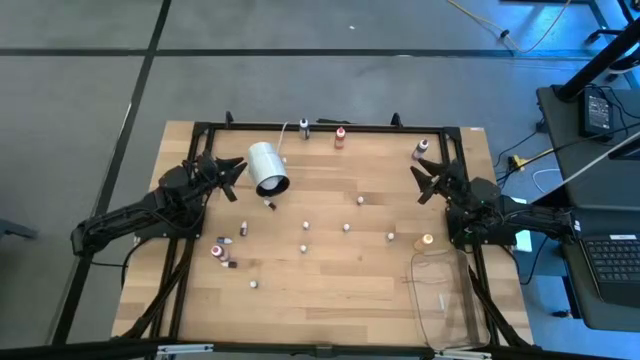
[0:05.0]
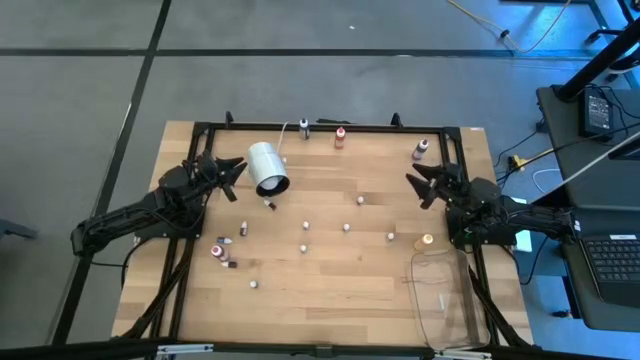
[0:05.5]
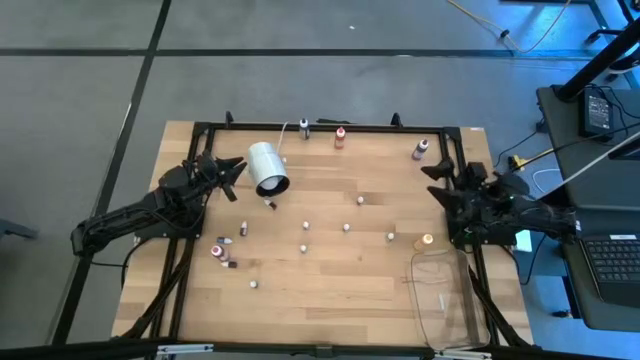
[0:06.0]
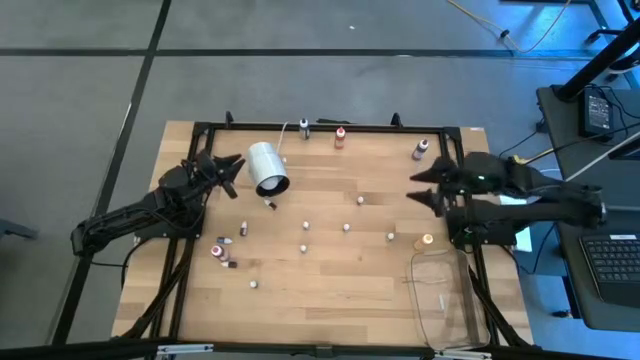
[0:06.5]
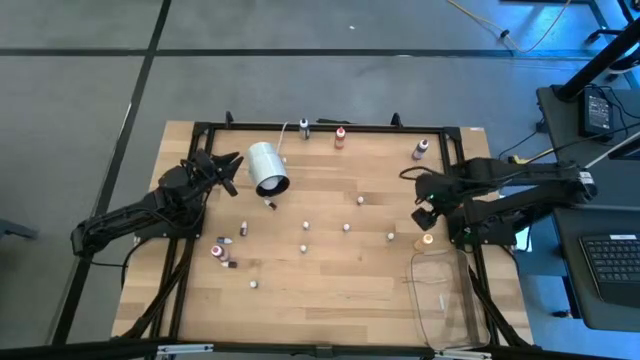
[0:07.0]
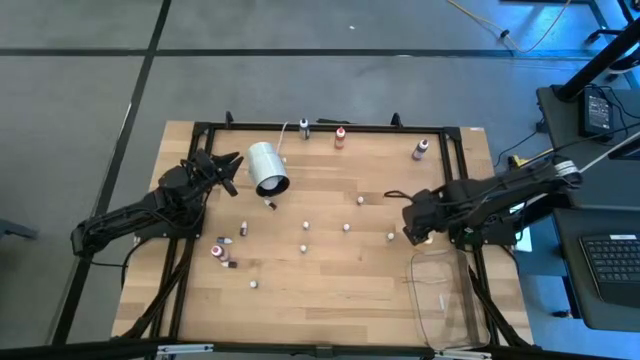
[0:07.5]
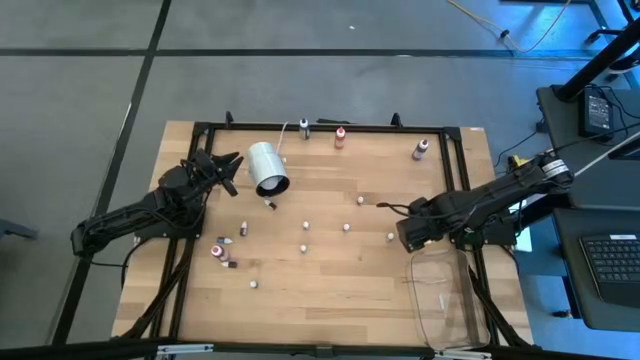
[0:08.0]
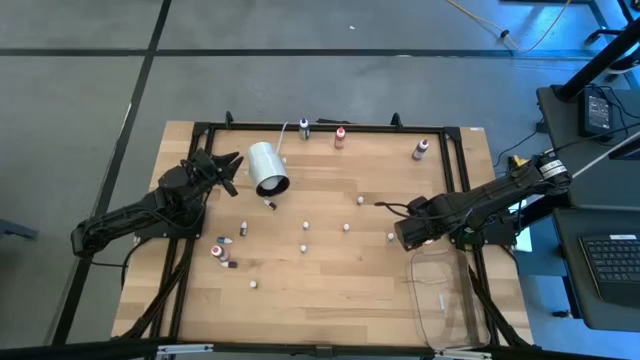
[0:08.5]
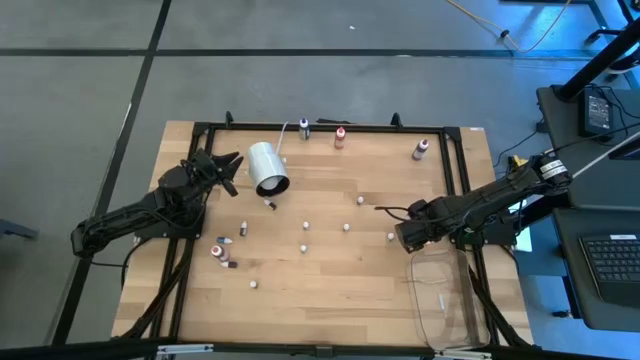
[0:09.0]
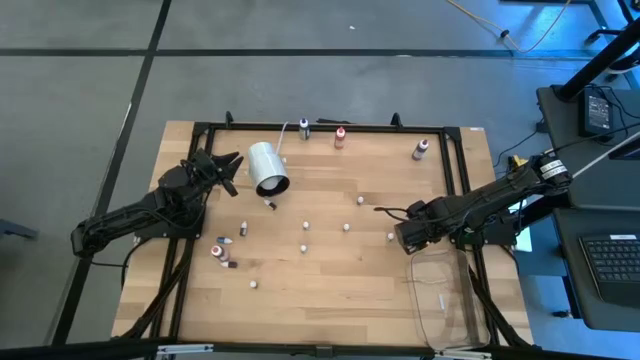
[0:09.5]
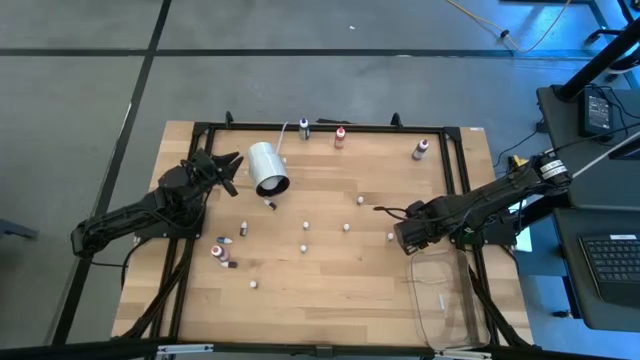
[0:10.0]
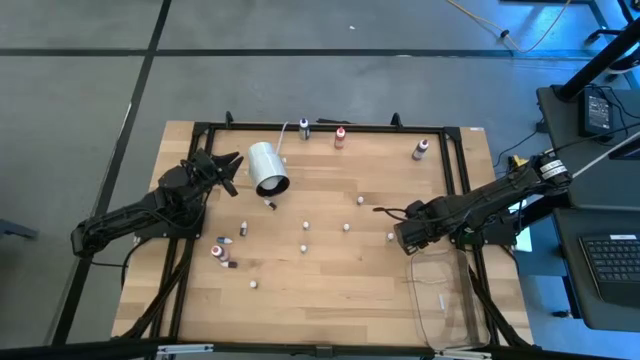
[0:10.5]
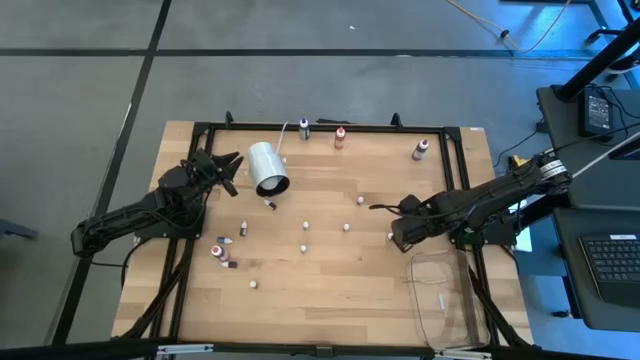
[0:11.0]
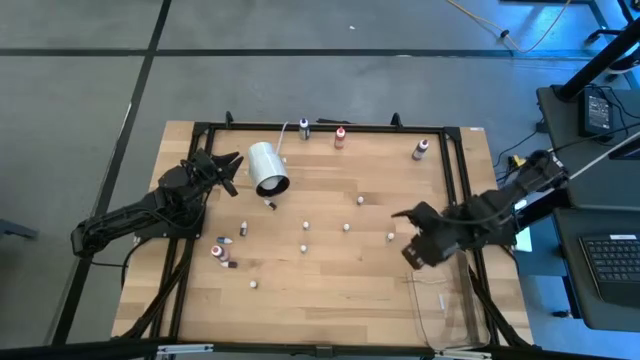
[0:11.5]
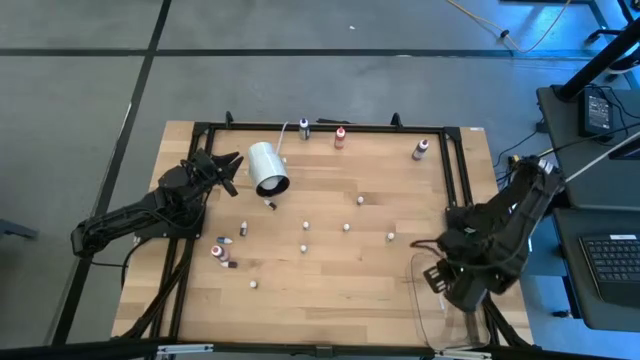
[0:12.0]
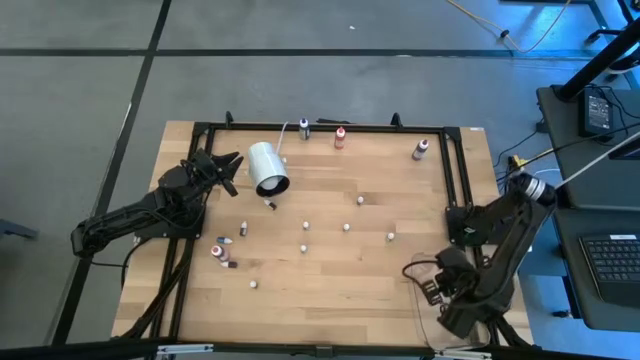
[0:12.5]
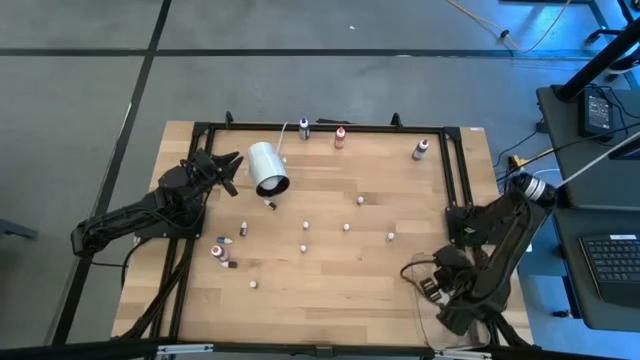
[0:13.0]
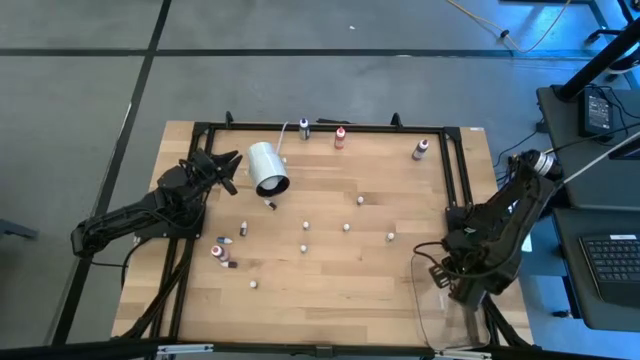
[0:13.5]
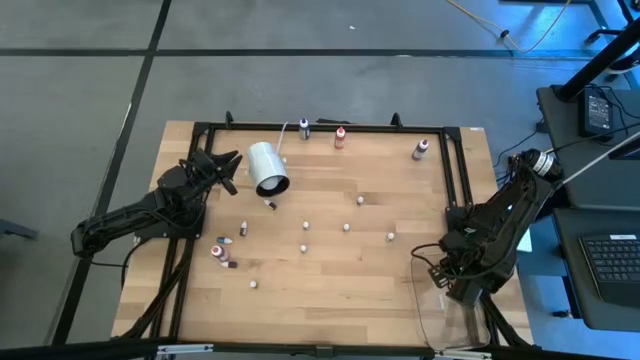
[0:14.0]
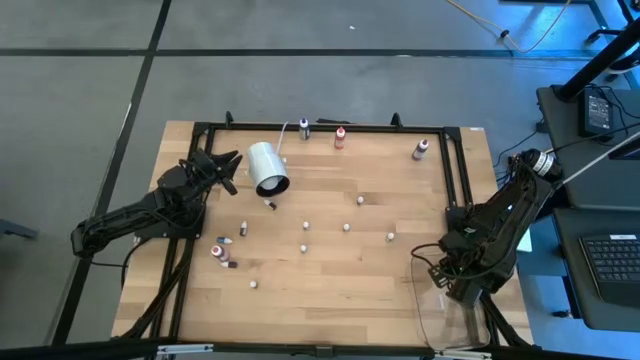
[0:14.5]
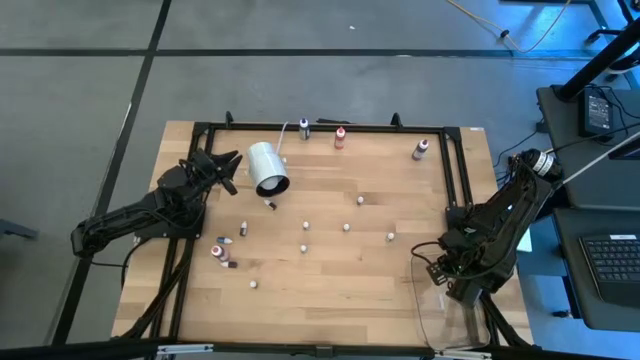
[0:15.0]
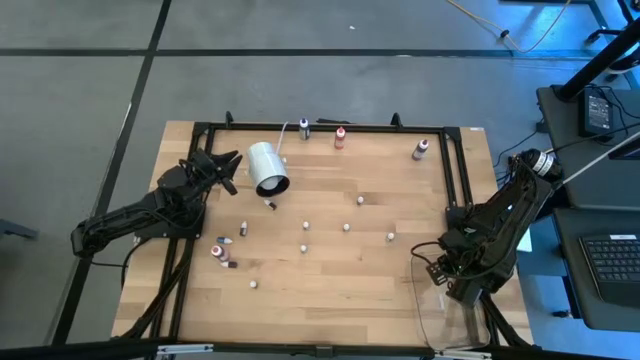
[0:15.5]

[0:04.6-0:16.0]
Task: Pick & Place food coloring
Put the large yellow food coloring bottle into the transparent bin

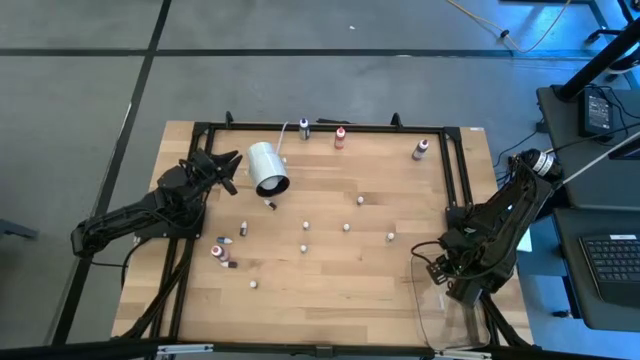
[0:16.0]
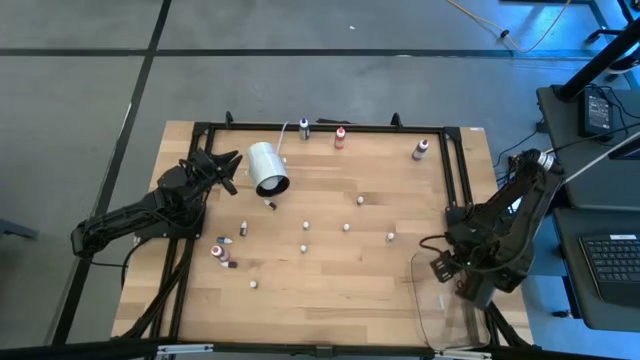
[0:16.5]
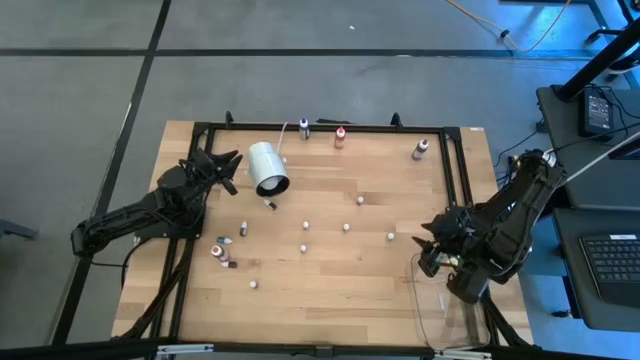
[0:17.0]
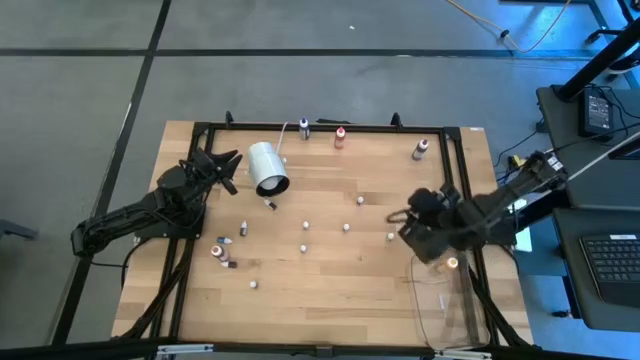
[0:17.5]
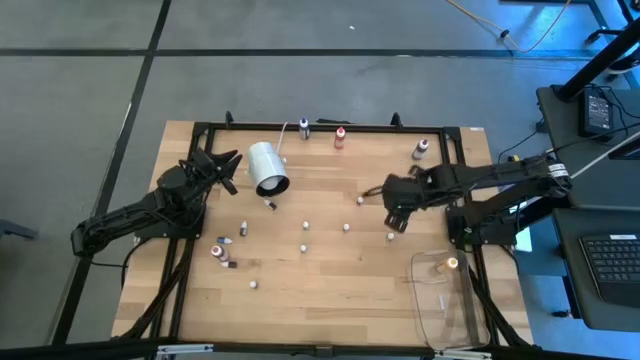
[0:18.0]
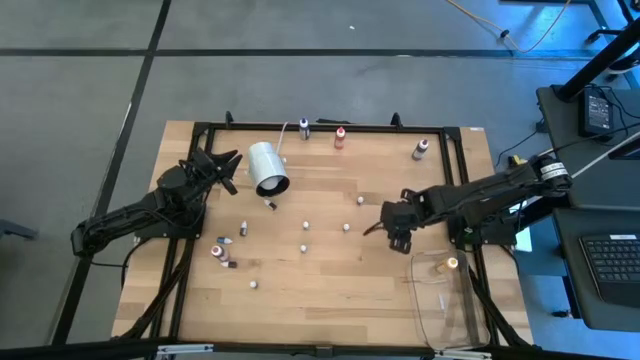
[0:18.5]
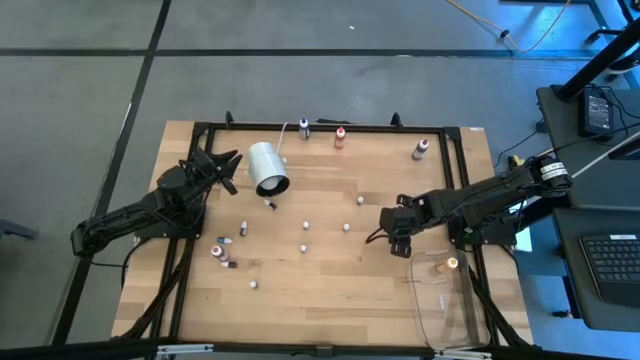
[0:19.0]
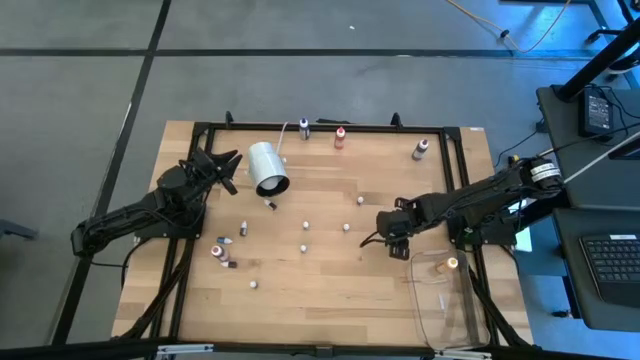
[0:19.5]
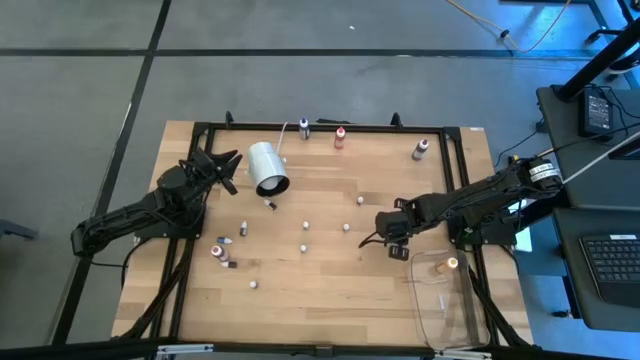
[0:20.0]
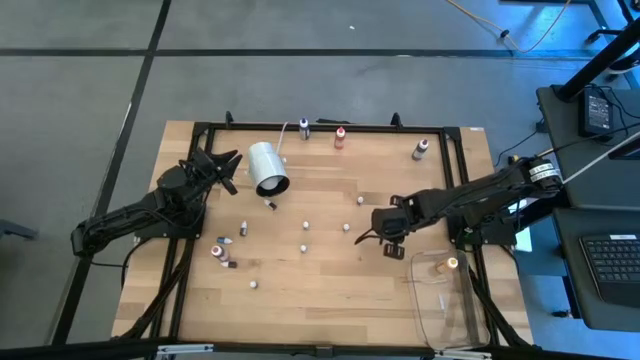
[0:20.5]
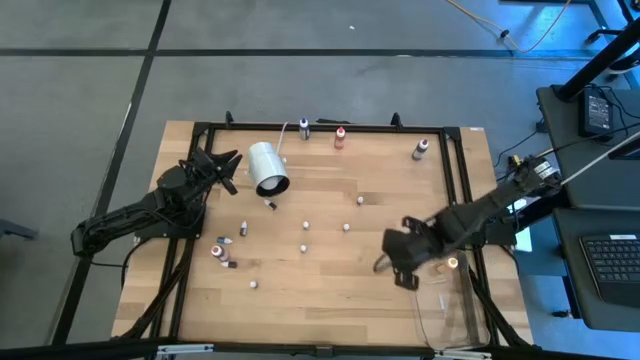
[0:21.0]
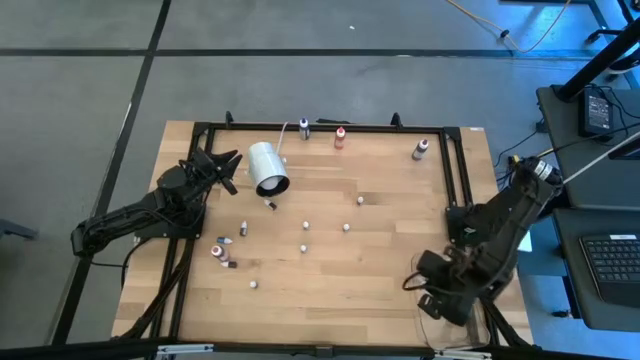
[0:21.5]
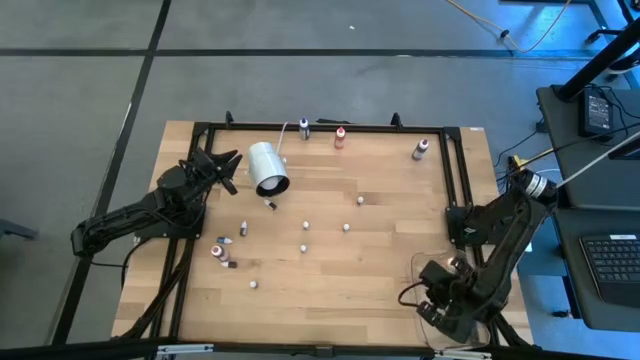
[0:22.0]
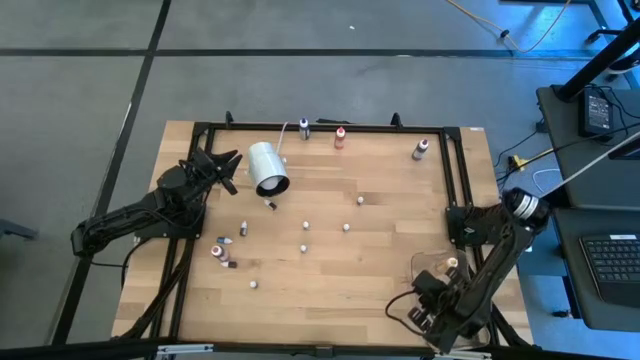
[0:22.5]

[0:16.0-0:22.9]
Put the small black food coloring bottle into the transparent bin

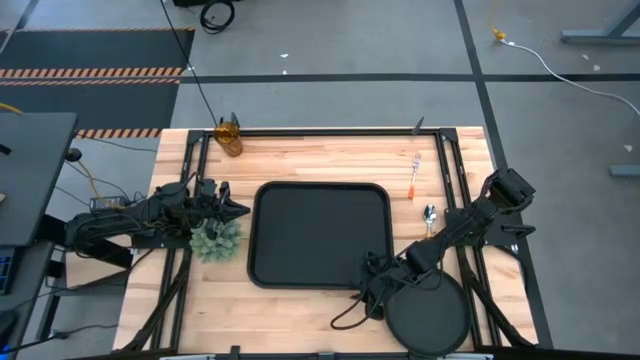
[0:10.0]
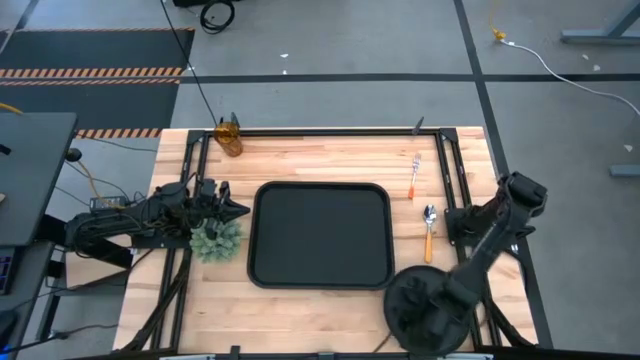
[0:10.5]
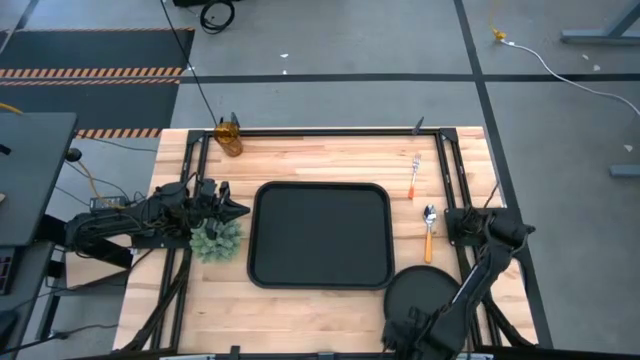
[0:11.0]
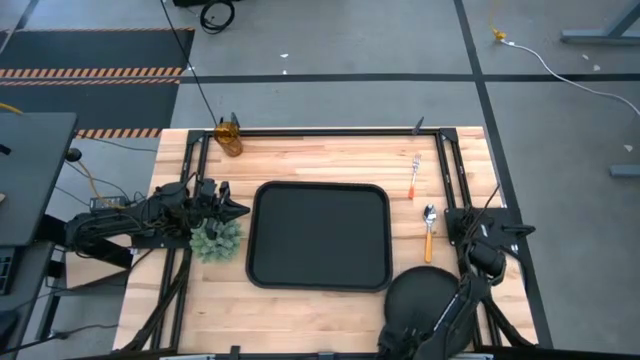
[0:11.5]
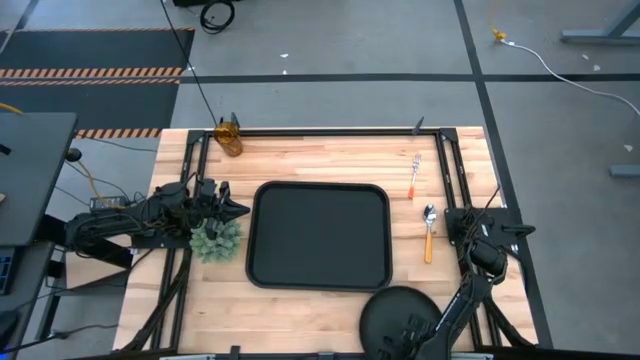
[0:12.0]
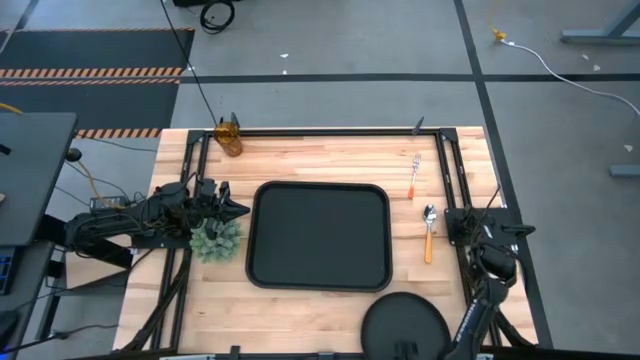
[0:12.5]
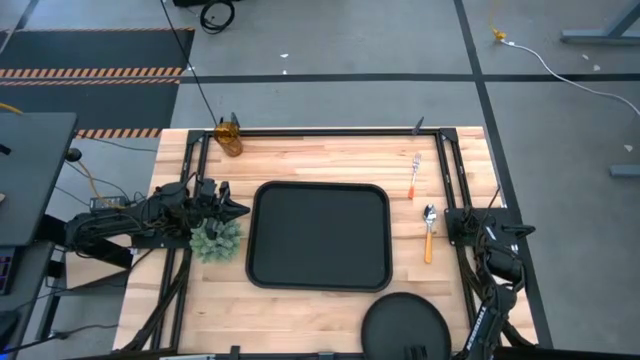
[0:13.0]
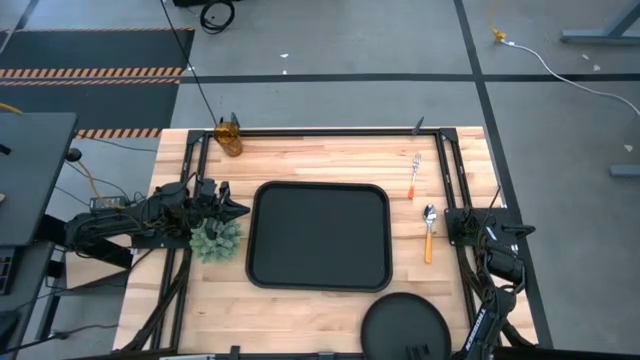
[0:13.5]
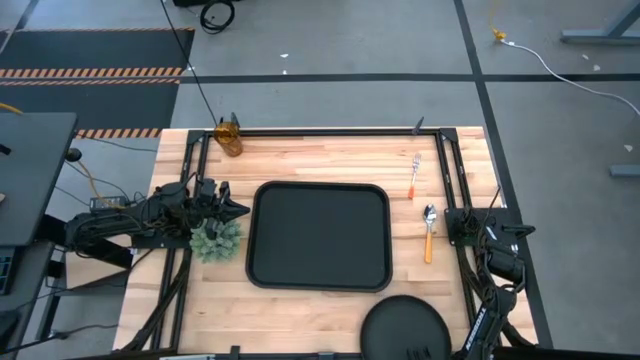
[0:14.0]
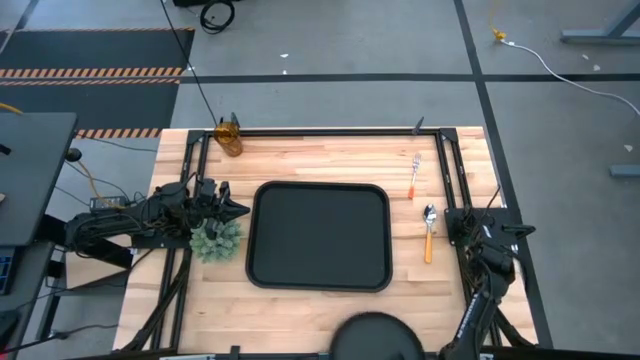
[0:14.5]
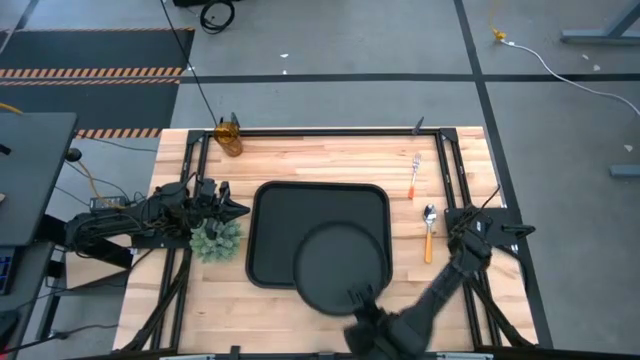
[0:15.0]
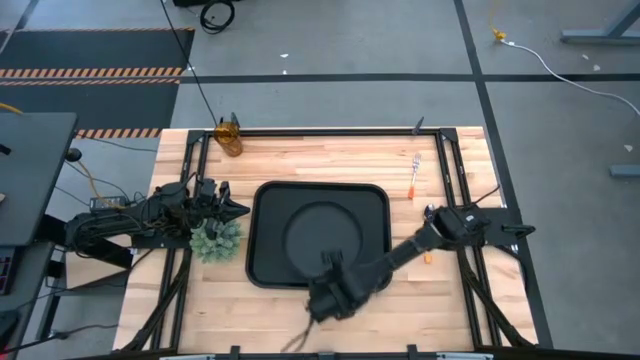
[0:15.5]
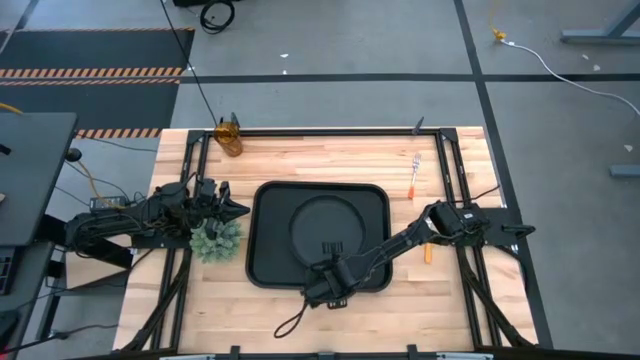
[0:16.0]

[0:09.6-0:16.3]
Task: Pick and place plate/cup/fork/spoon on tray
Put the black plate on the black serving tray
